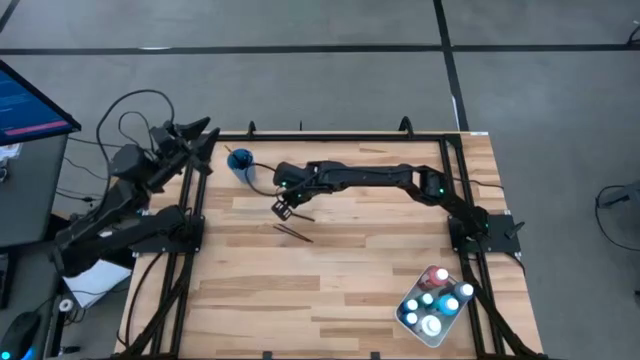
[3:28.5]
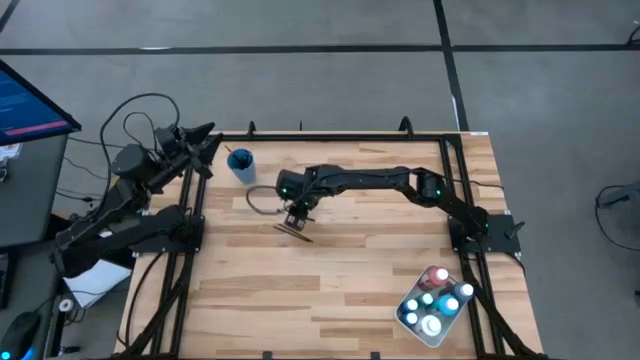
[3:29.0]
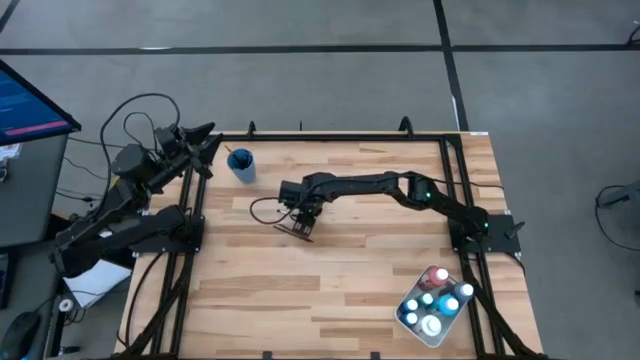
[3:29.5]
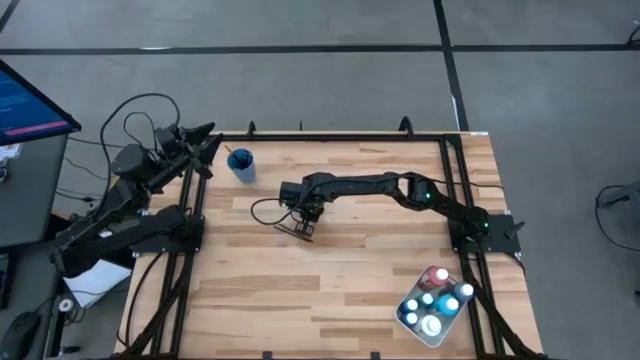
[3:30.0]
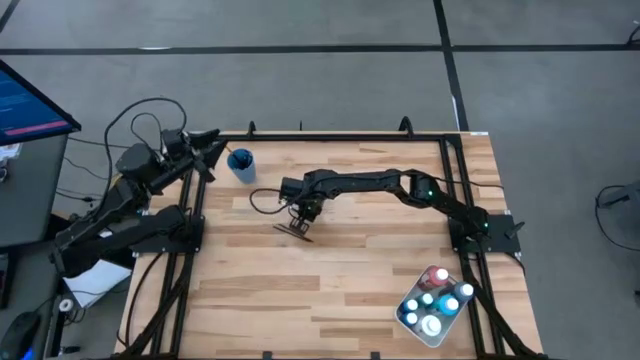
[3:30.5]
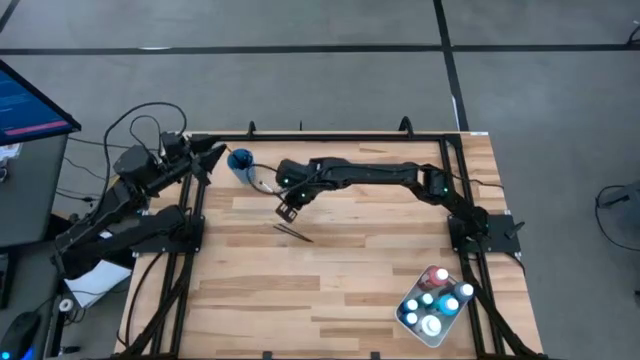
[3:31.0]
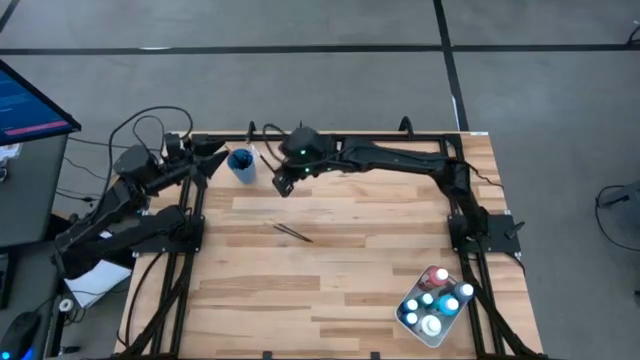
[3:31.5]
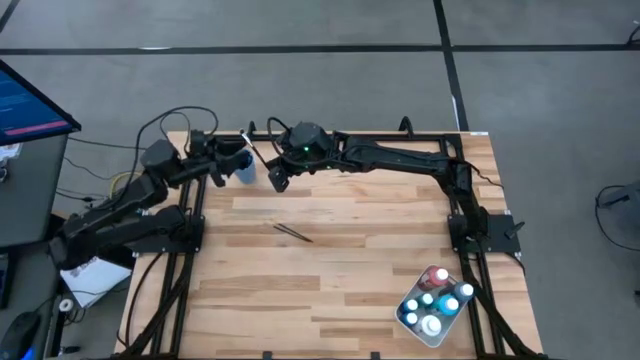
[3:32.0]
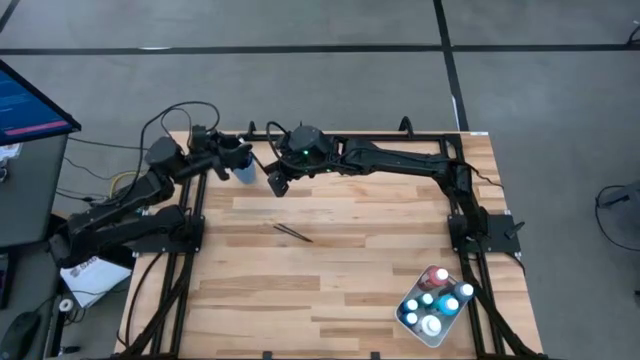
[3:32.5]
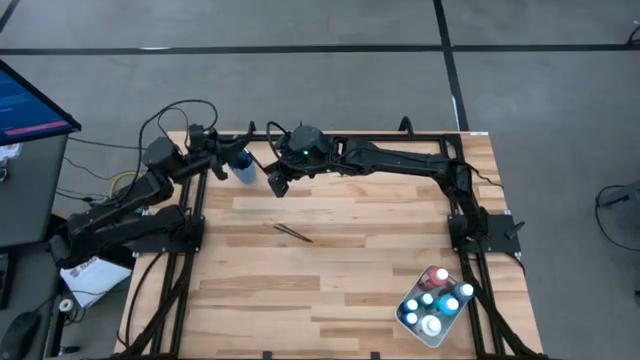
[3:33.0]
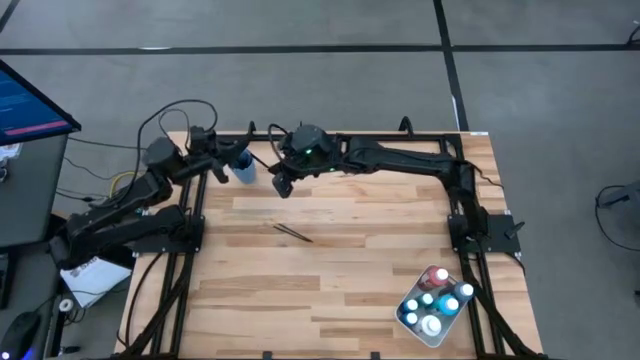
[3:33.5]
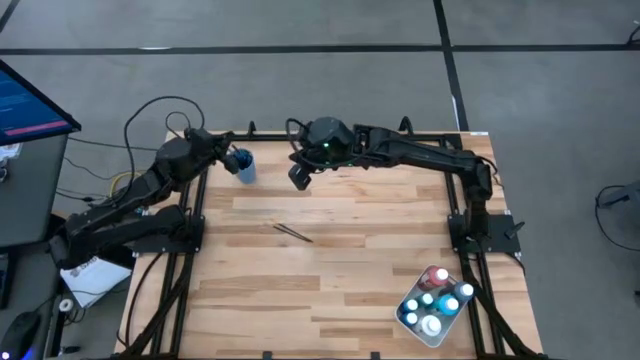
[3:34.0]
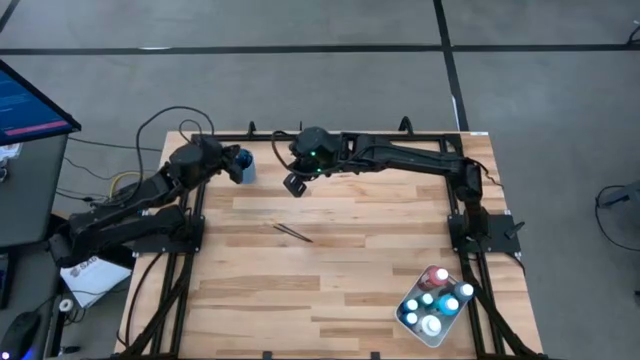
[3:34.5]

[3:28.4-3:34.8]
Task: Pick & Place Paint Supplies
Put the silver paint brush into the blue cup

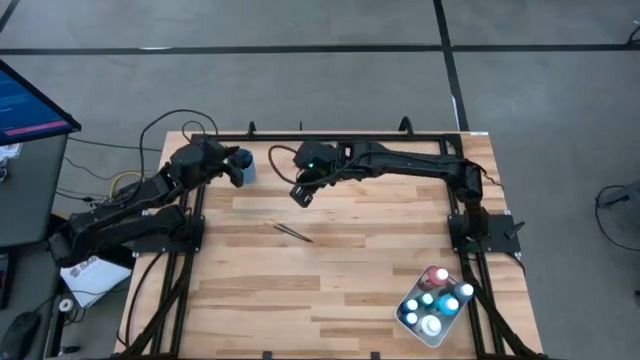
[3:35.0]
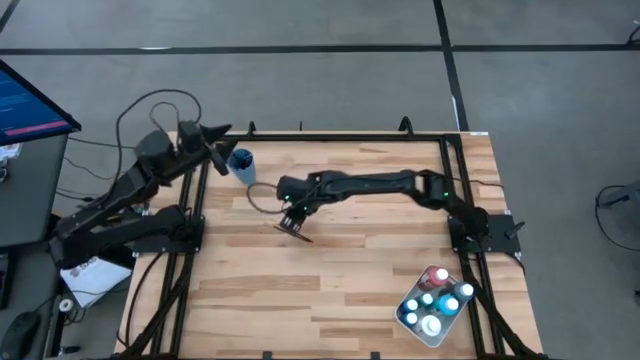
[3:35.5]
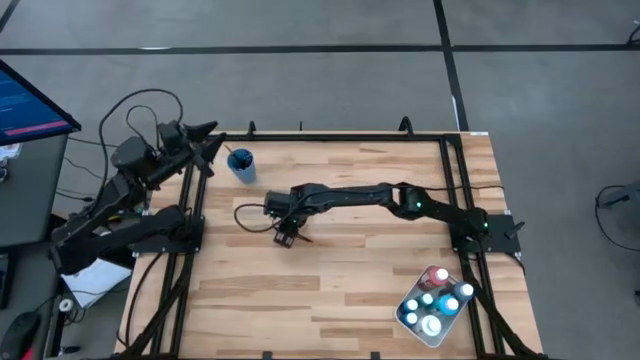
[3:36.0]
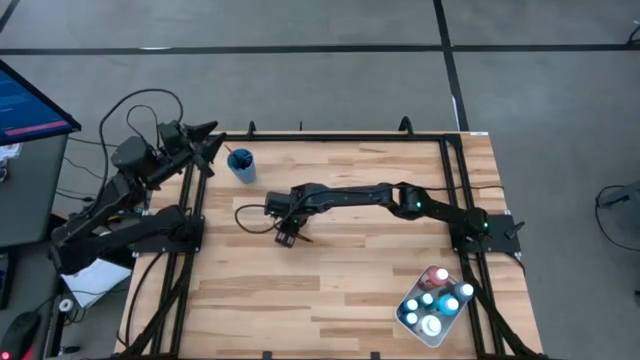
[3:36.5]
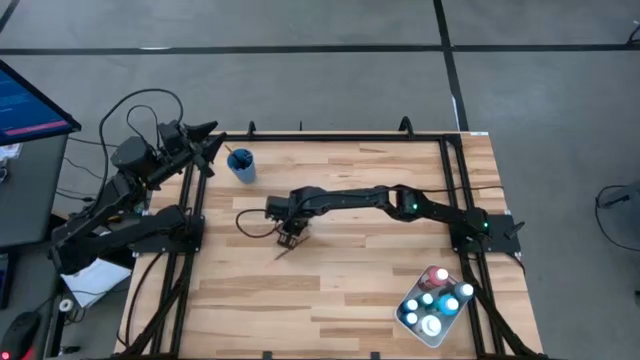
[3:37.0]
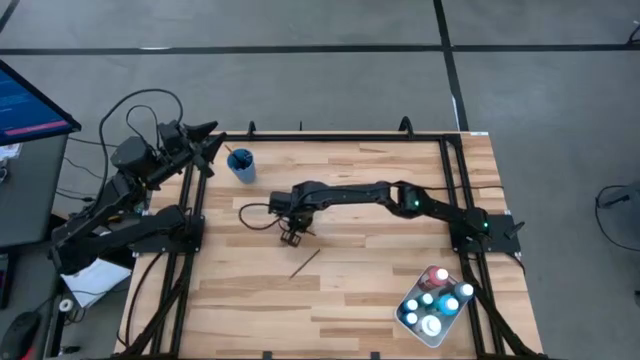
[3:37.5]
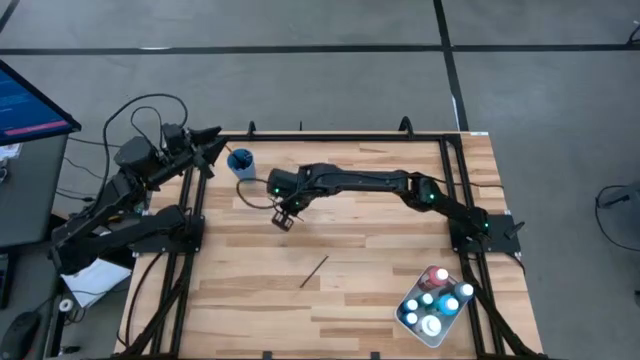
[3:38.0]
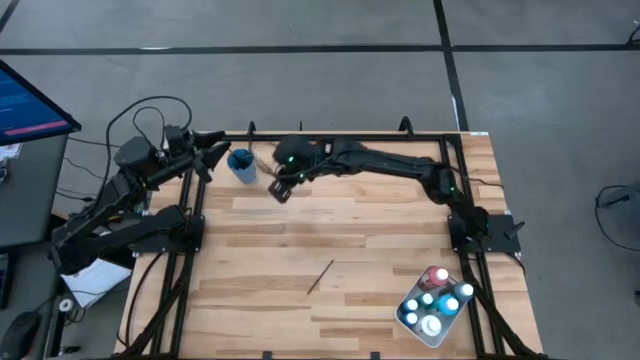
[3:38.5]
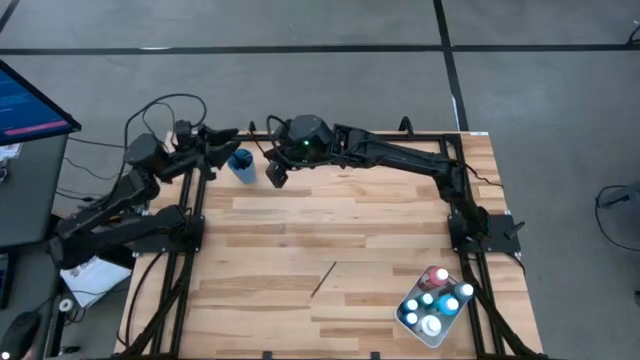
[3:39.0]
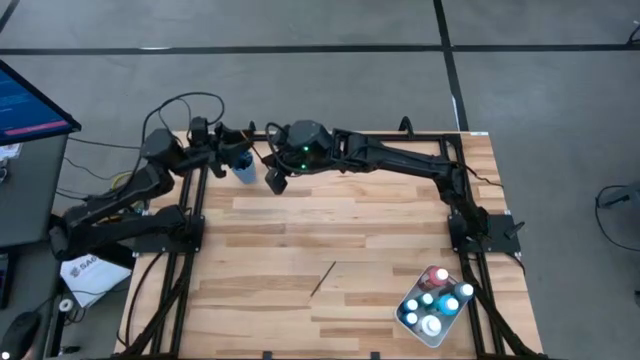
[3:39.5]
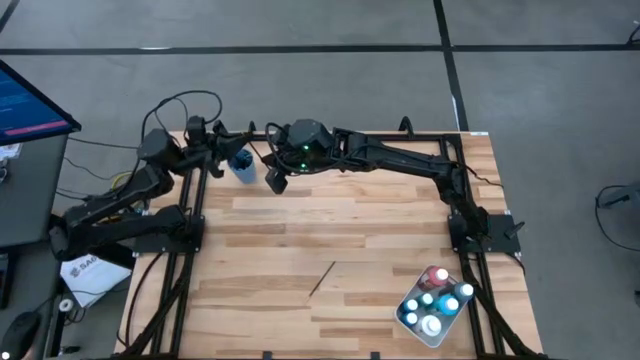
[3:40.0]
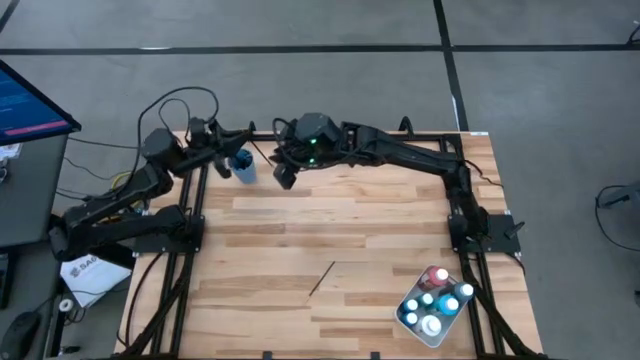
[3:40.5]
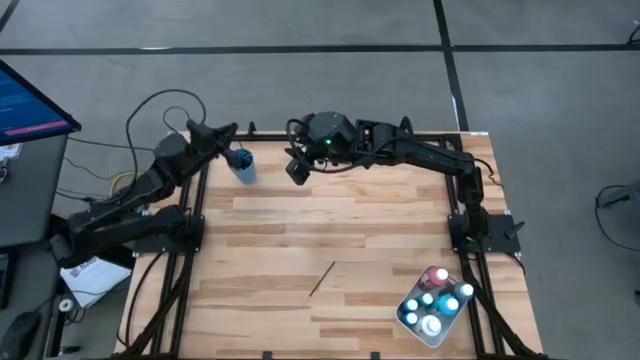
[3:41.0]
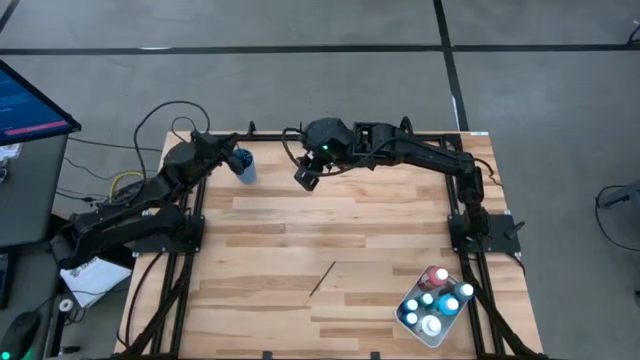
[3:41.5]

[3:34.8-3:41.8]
Put the right gold paint brush into the blue cup

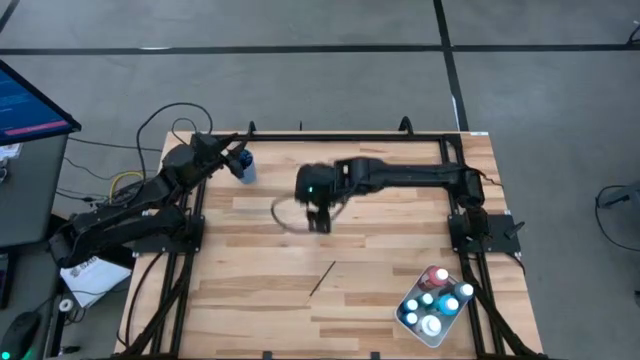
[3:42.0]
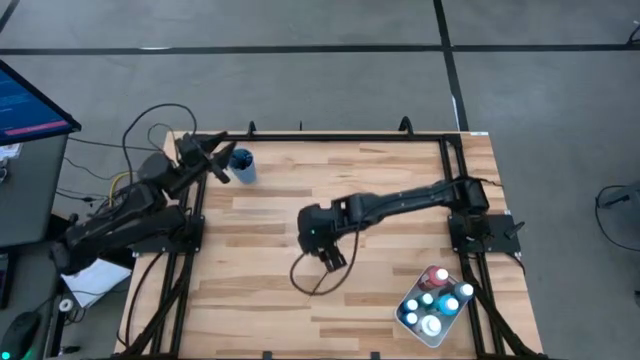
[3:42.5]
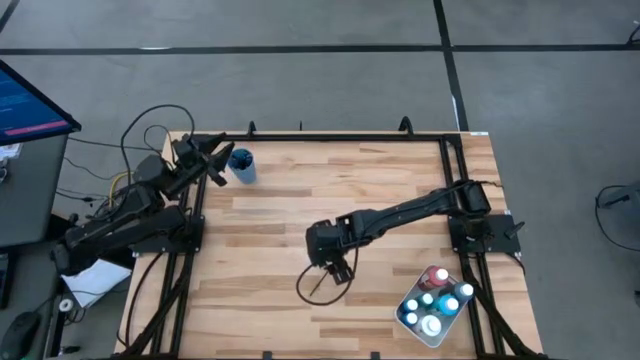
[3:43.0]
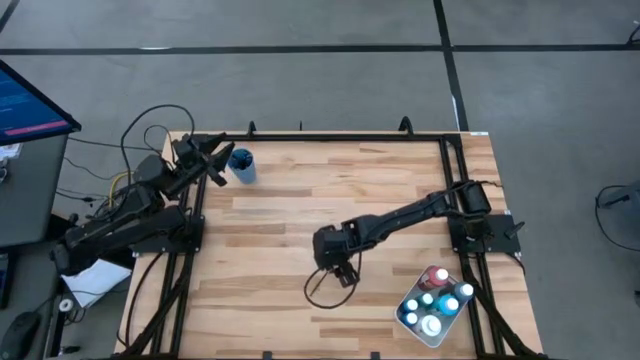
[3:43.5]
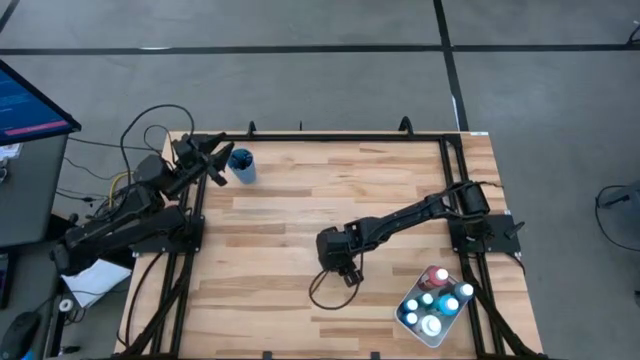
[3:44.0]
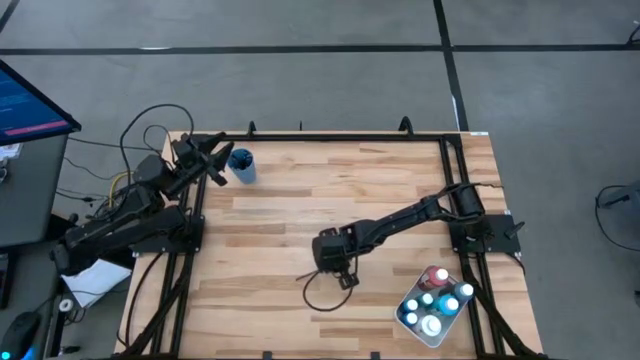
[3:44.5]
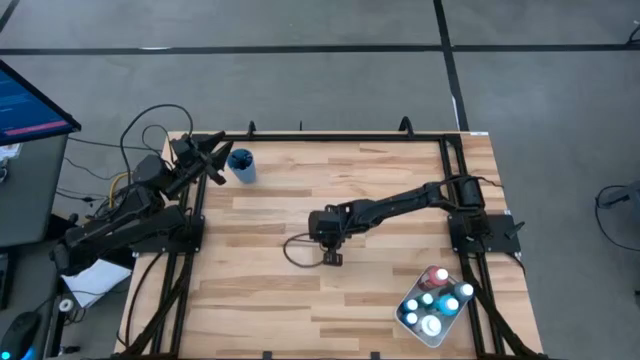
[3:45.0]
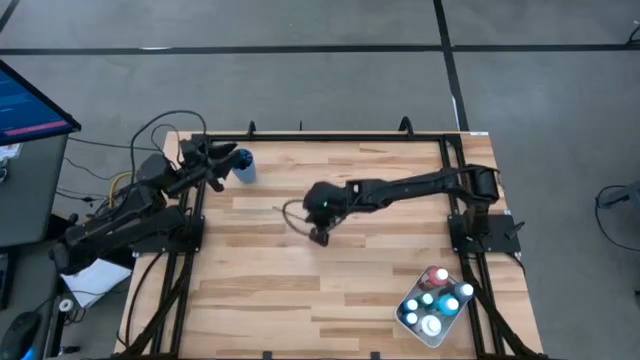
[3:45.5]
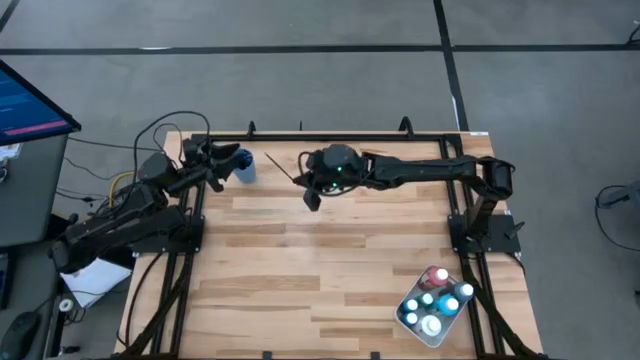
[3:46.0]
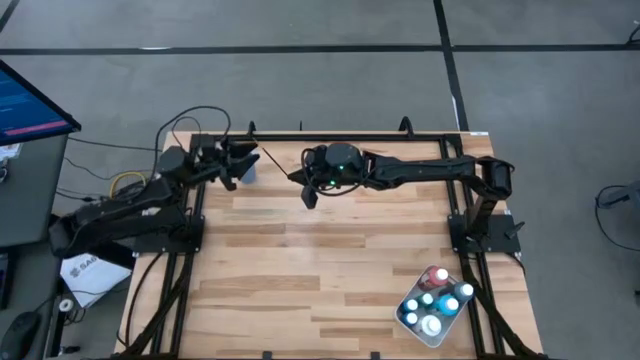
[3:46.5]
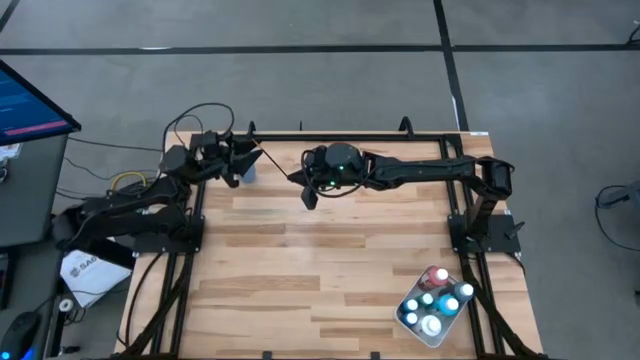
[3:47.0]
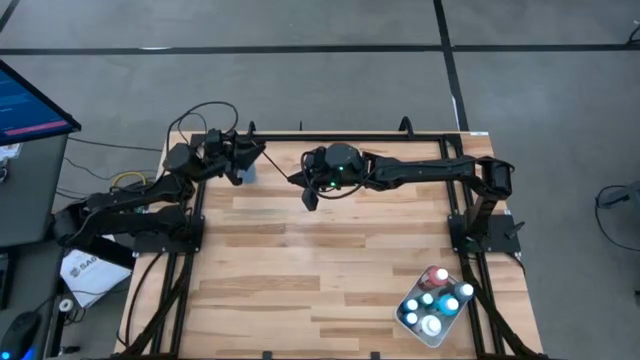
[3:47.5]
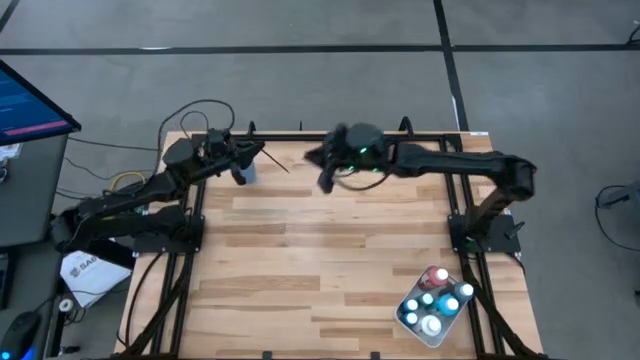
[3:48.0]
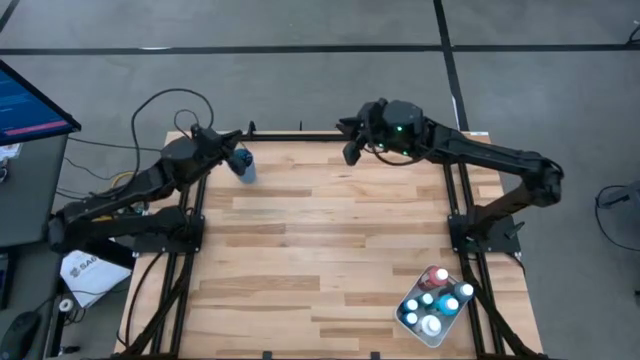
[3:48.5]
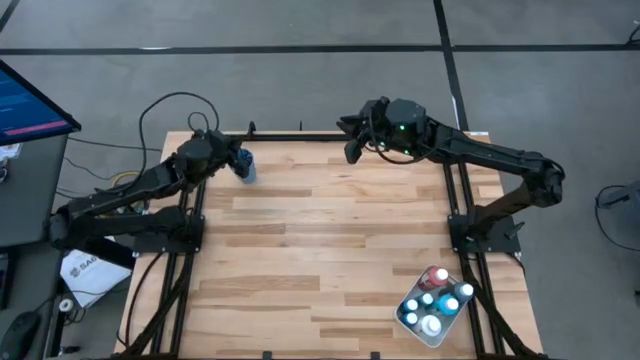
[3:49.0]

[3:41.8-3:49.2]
Put the gold paint brush into the blue cup
